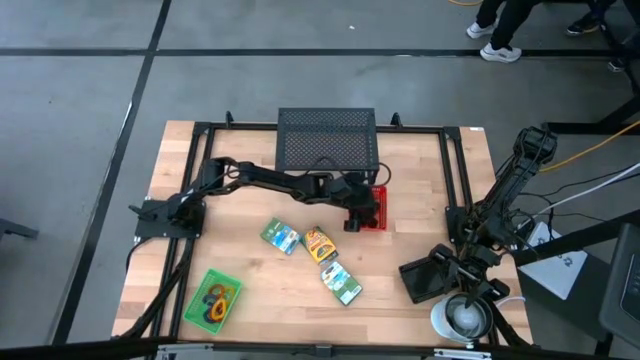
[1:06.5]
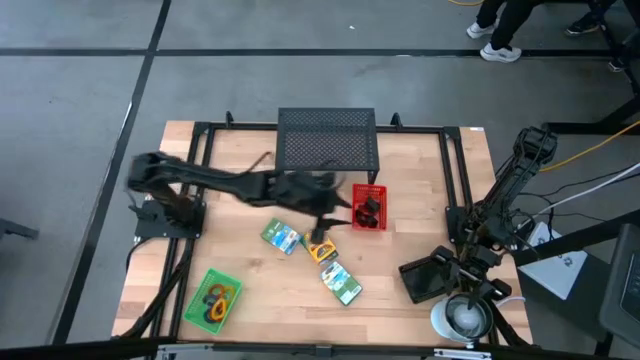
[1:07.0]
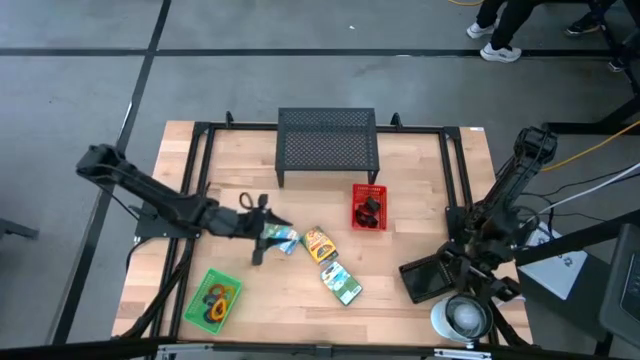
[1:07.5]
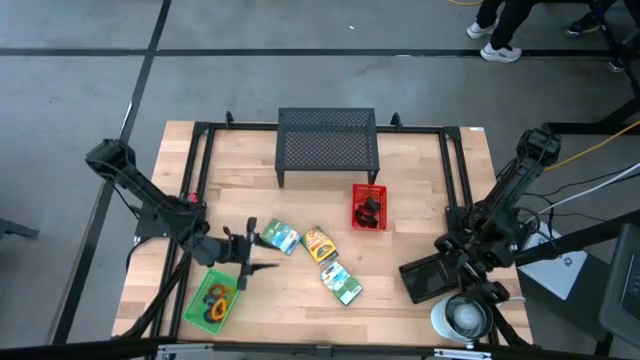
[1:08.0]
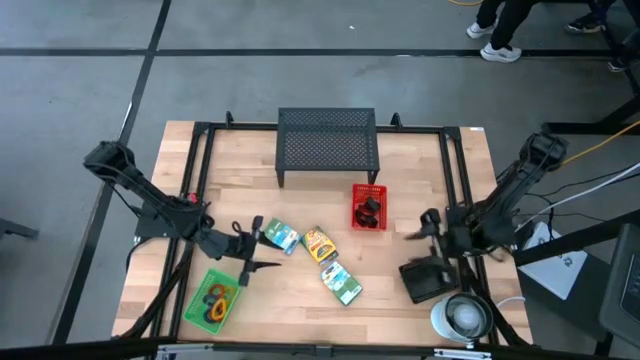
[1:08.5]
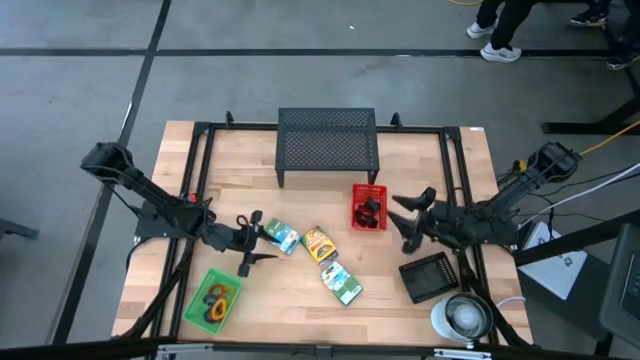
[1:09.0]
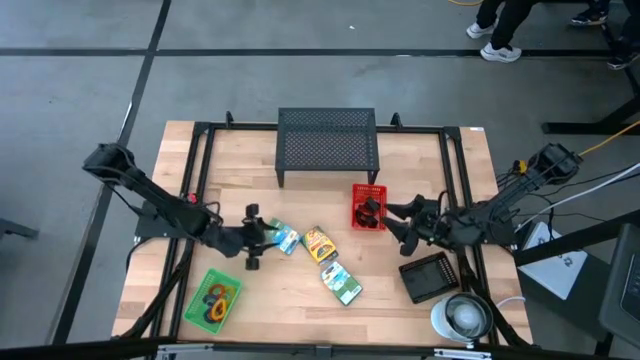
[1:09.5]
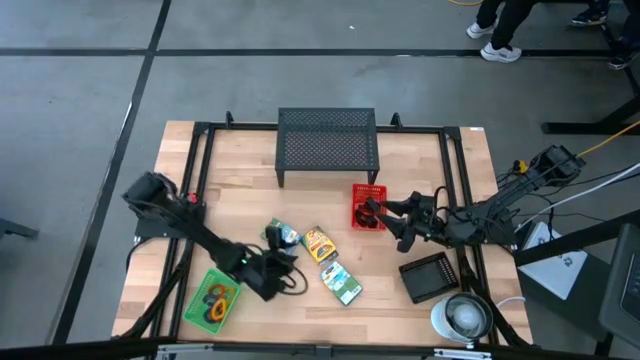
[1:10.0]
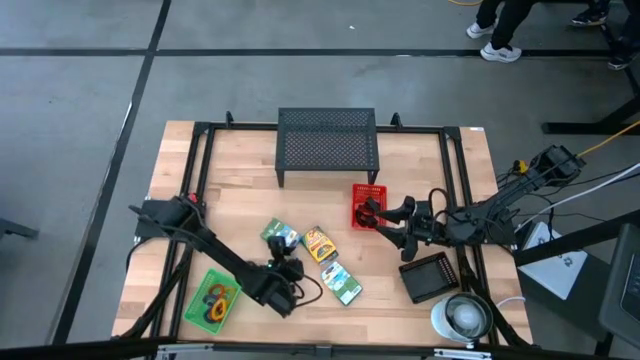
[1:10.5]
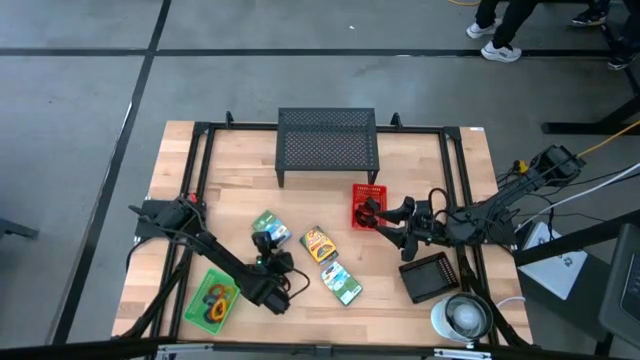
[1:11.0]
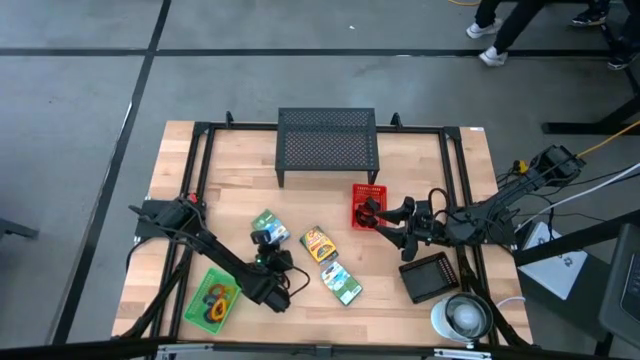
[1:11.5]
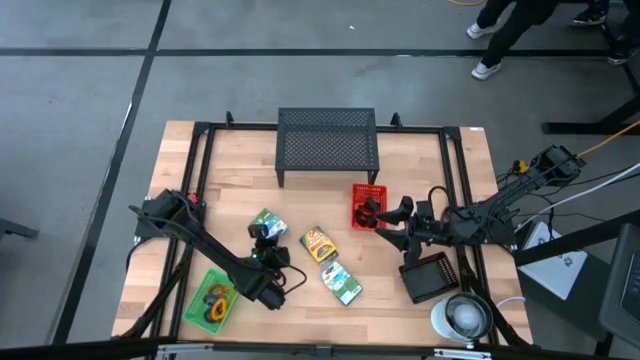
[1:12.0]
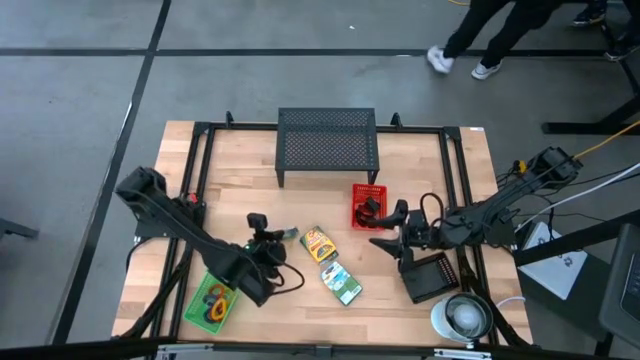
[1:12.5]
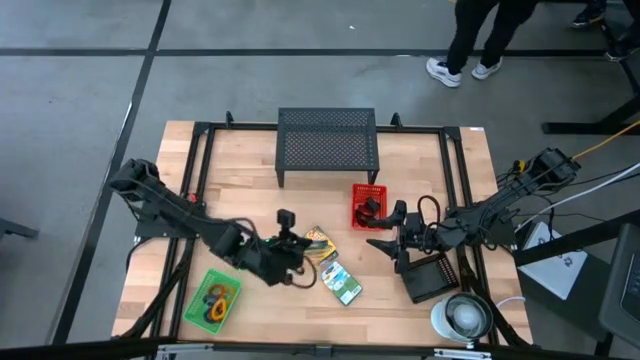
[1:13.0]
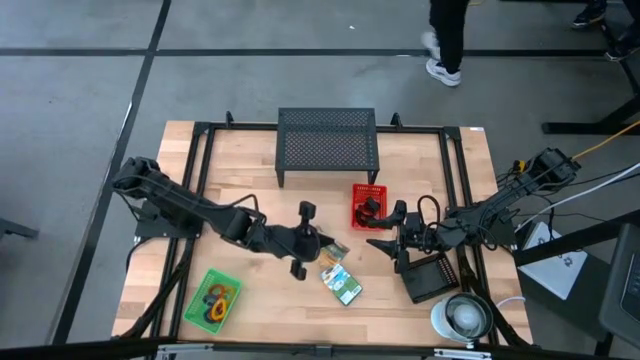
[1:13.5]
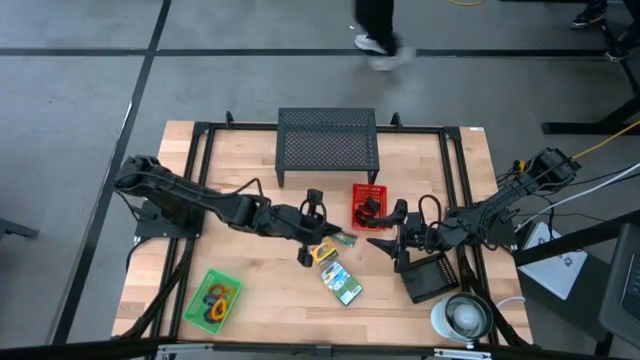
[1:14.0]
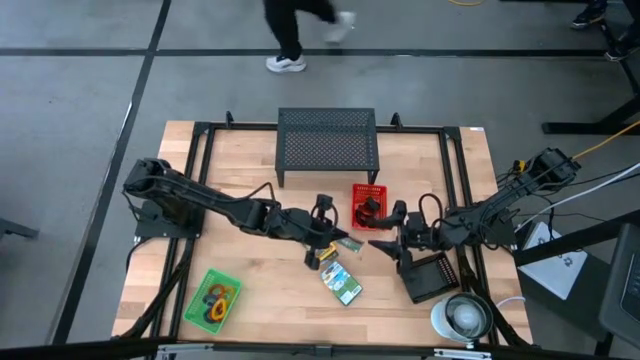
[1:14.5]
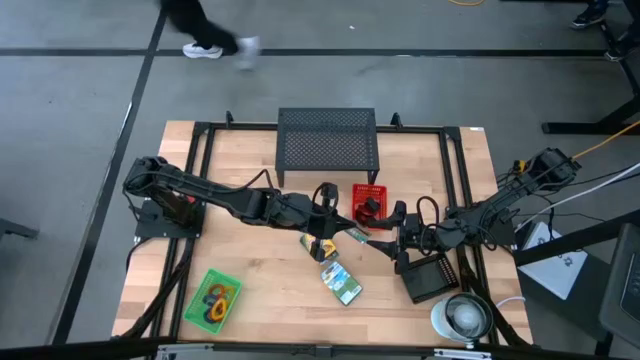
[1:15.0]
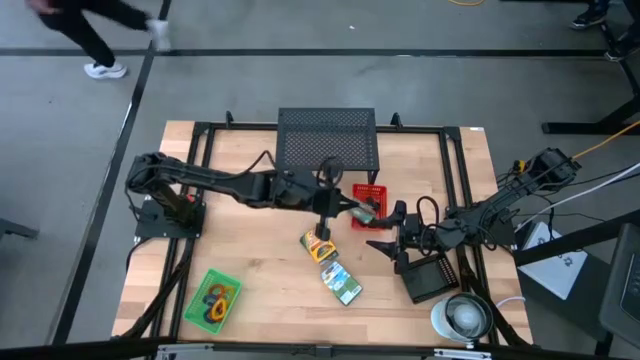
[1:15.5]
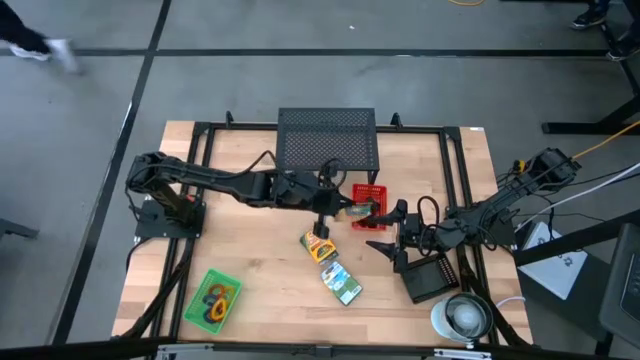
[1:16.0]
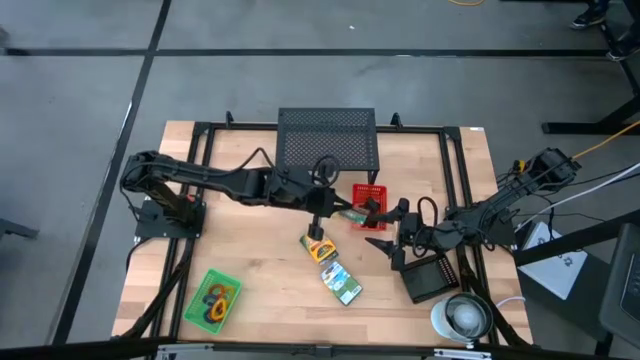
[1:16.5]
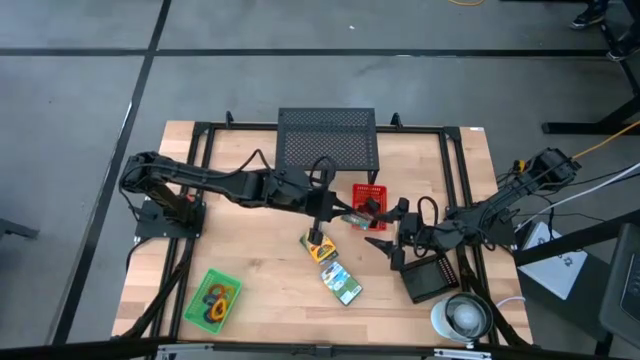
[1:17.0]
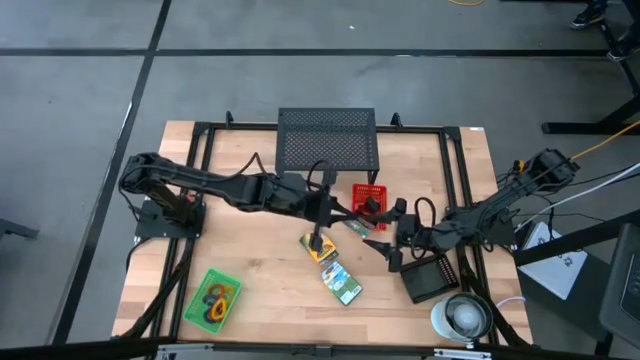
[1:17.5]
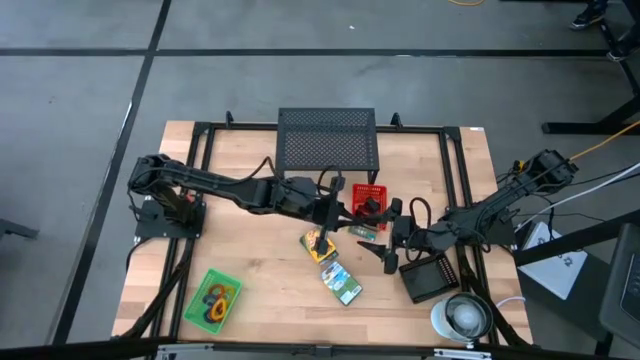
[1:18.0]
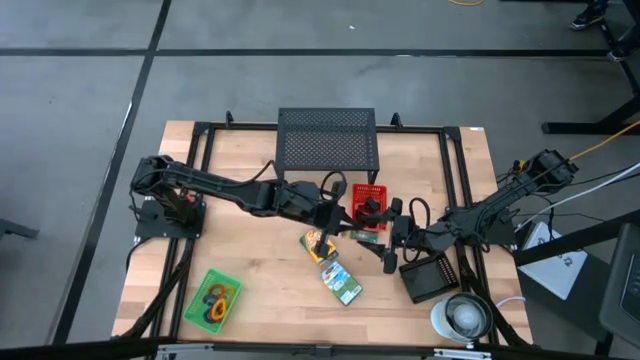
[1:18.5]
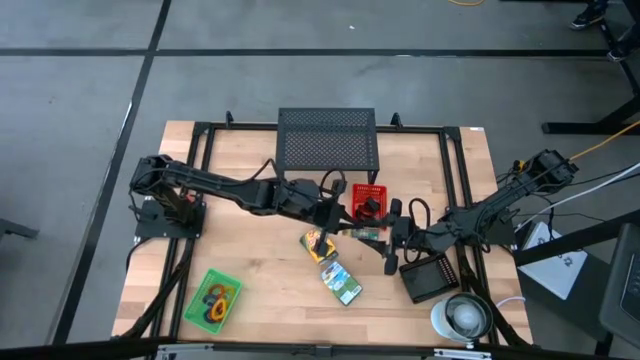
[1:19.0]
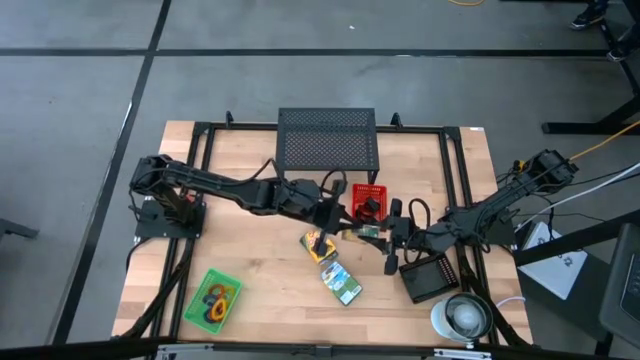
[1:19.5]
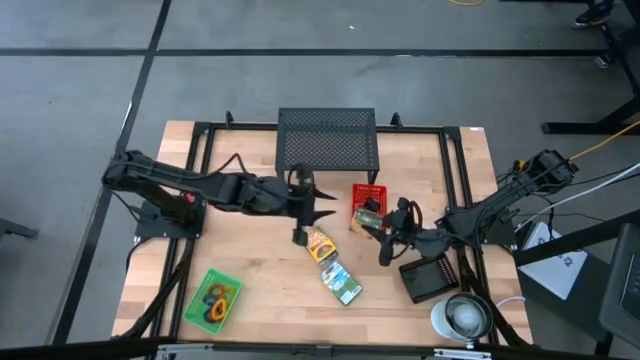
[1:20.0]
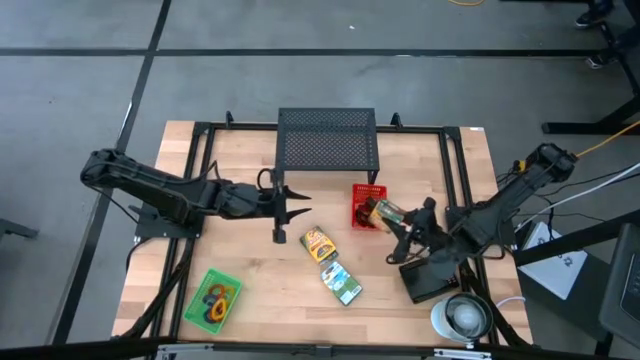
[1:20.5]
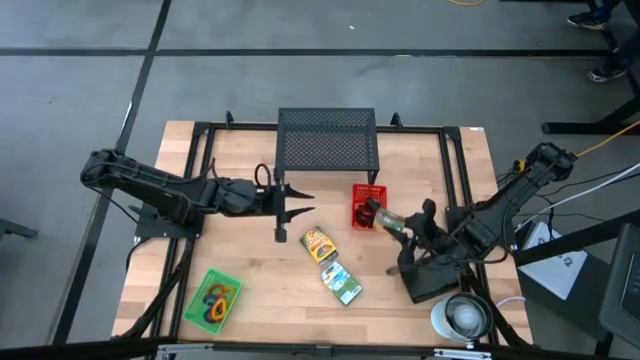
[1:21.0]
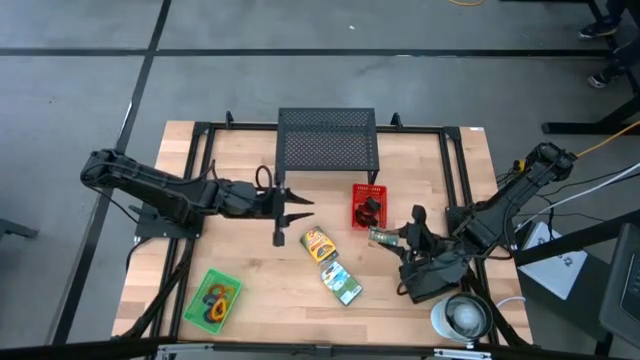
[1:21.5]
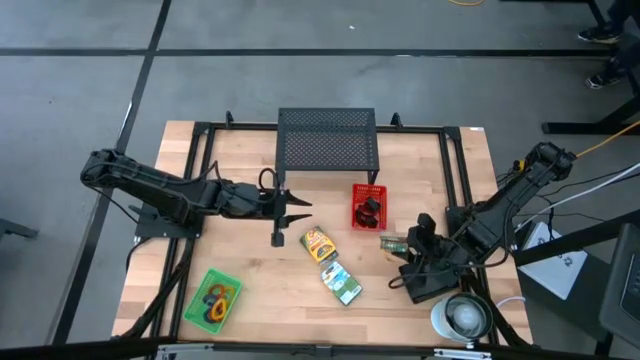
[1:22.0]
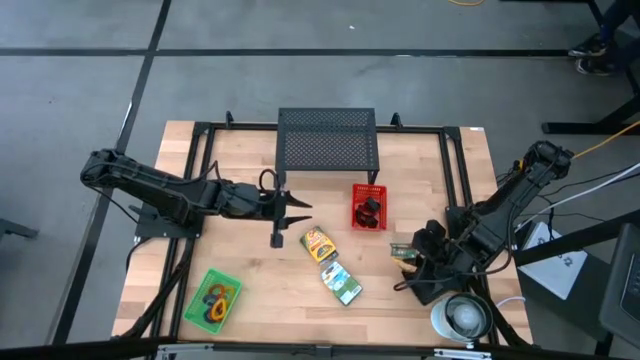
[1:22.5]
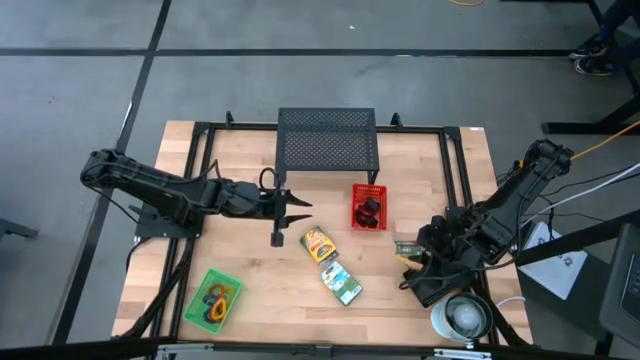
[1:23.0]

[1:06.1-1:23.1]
Task: Pick & Place Office Desk Supplies
Put the crayon box into the black bin

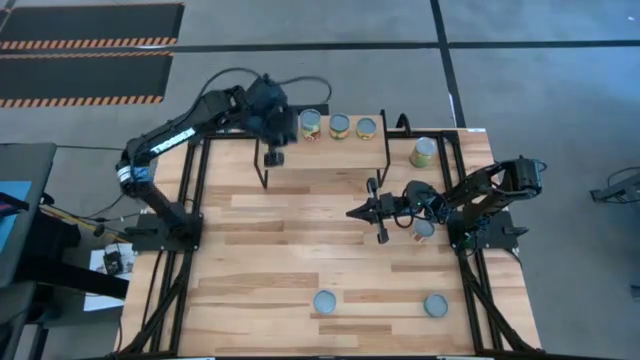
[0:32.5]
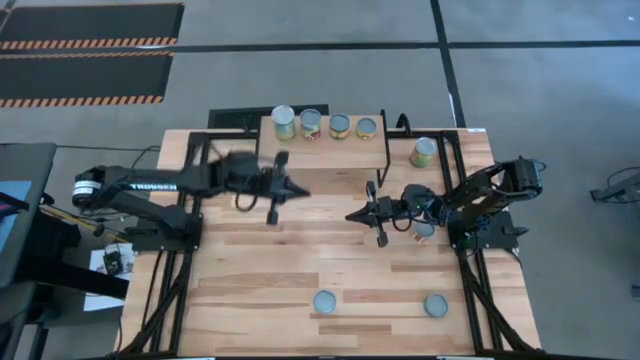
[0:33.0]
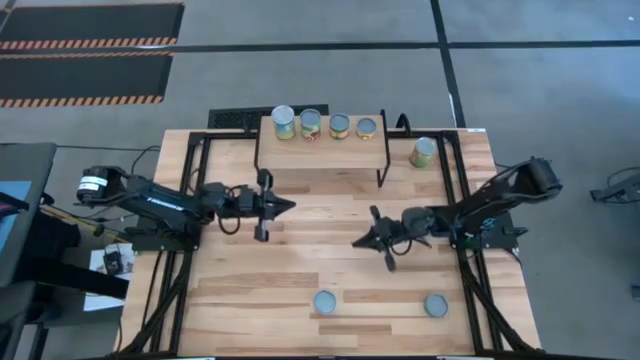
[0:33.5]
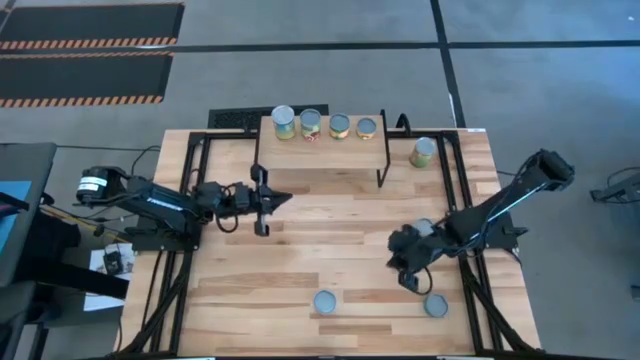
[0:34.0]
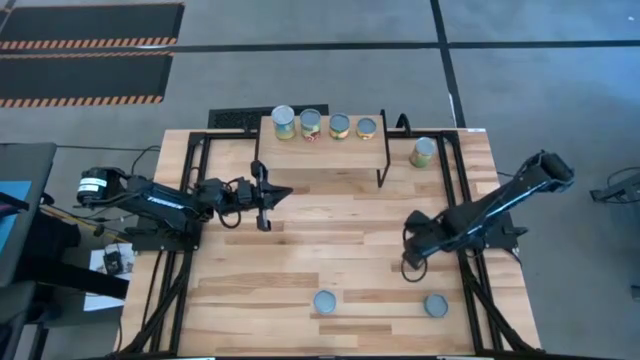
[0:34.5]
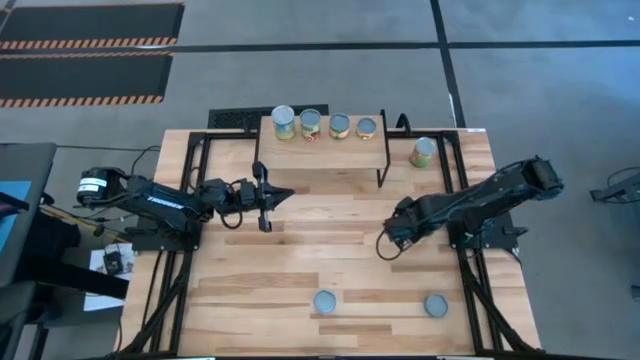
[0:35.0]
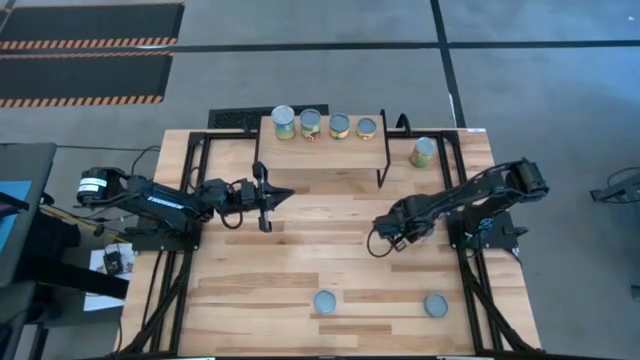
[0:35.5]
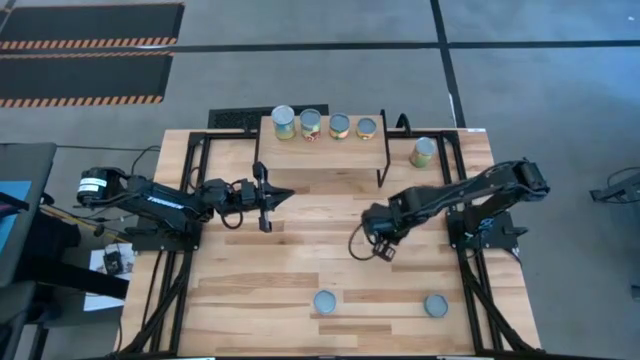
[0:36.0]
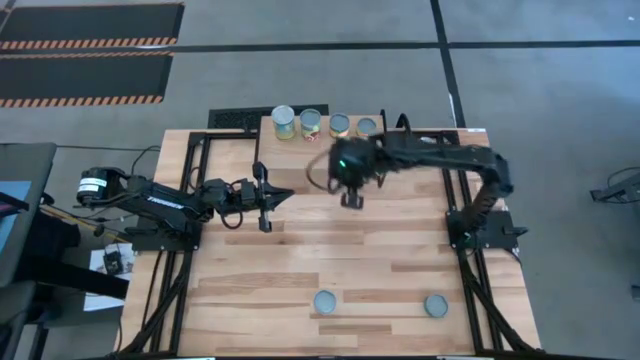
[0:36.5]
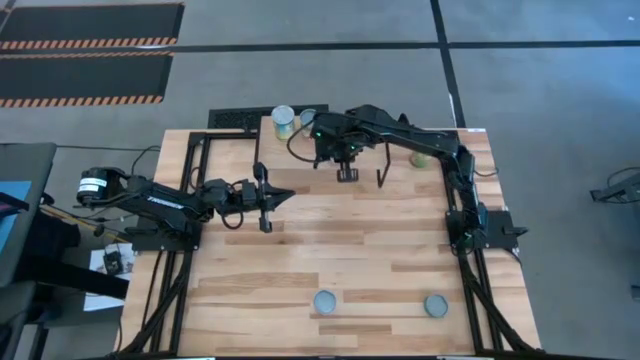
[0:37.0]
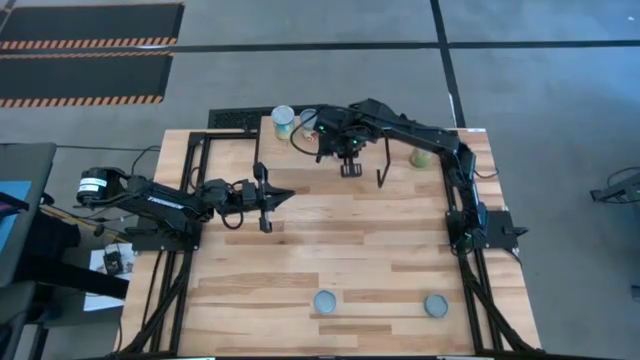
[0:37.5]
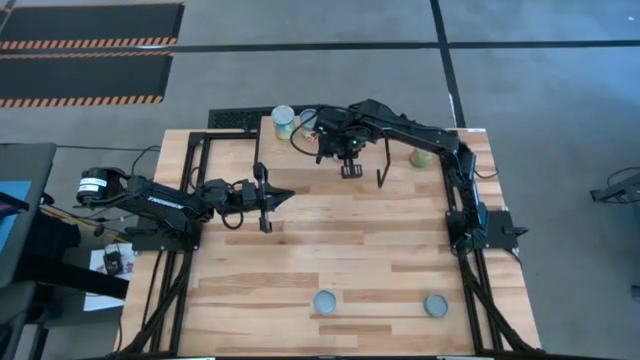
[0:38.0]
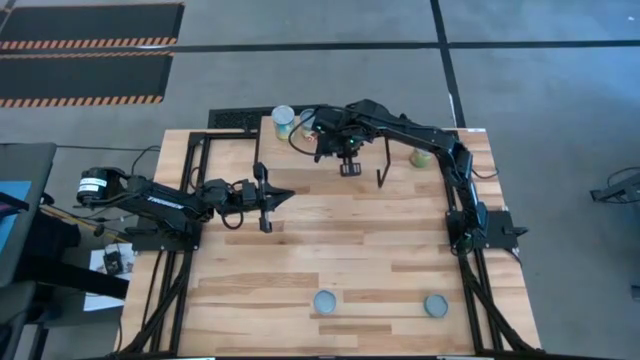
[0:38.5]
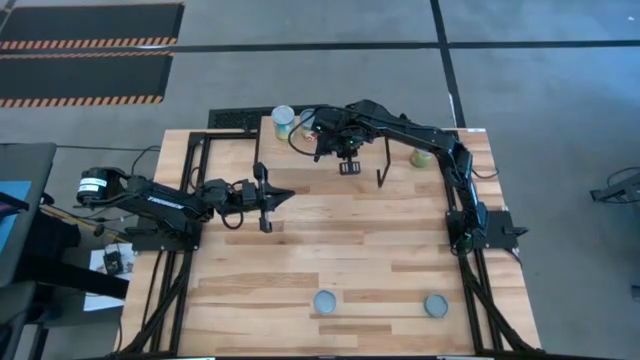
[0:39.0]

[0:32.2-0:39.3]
Task: Pick and place cans onto a shelf
Put the canned diced tomatoes on the shelf aligned with the canned peach
